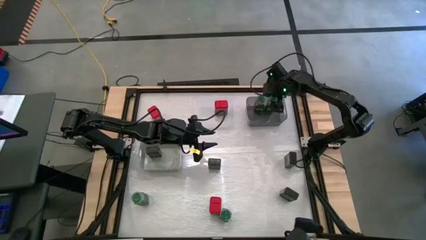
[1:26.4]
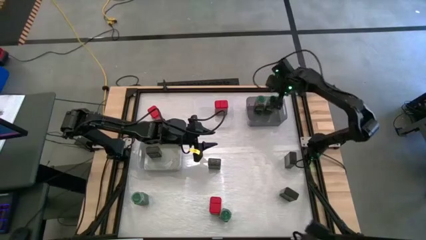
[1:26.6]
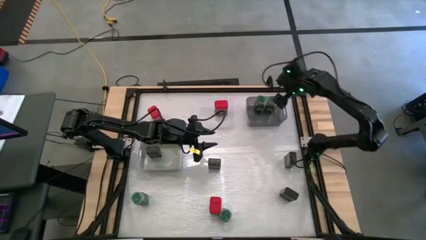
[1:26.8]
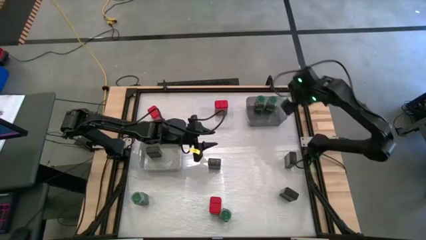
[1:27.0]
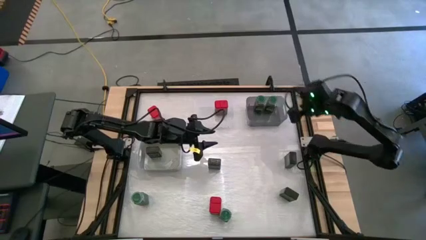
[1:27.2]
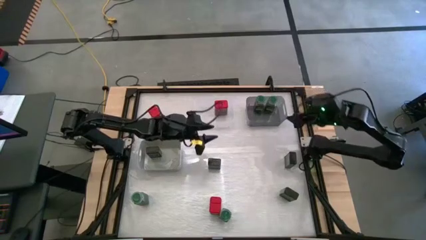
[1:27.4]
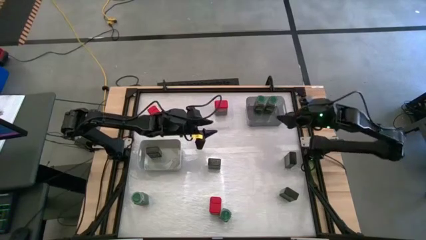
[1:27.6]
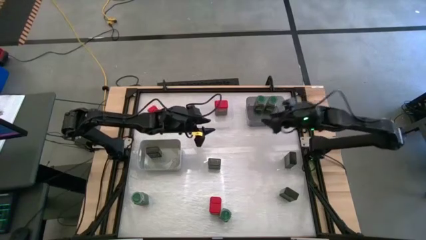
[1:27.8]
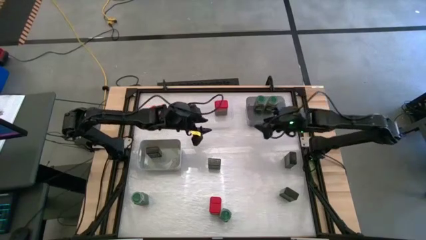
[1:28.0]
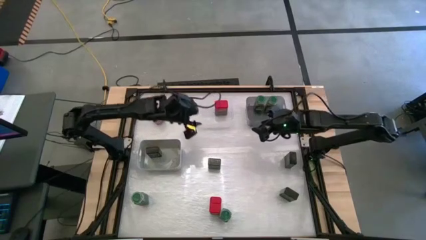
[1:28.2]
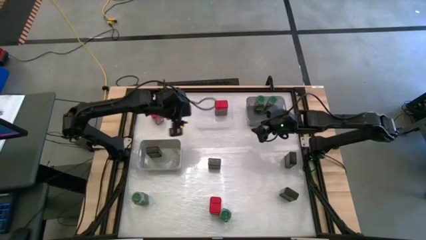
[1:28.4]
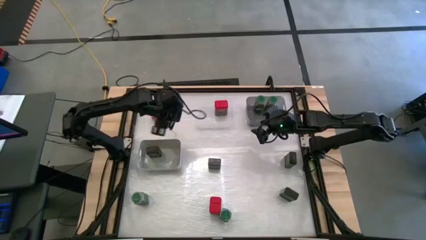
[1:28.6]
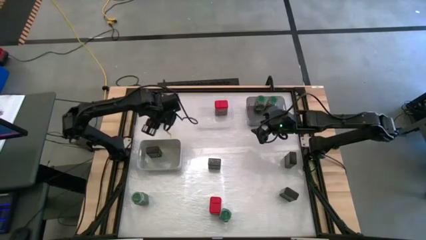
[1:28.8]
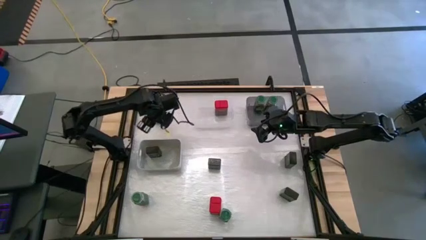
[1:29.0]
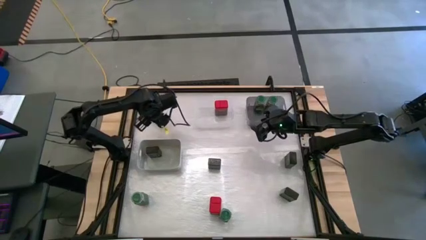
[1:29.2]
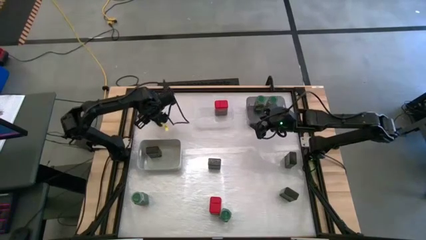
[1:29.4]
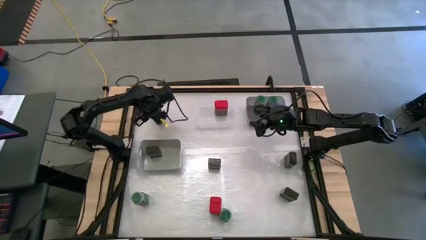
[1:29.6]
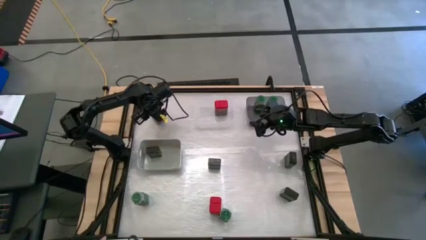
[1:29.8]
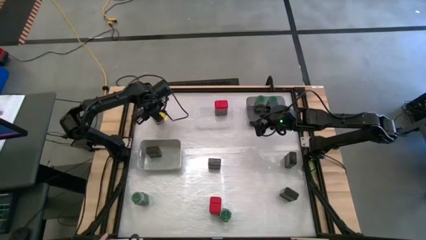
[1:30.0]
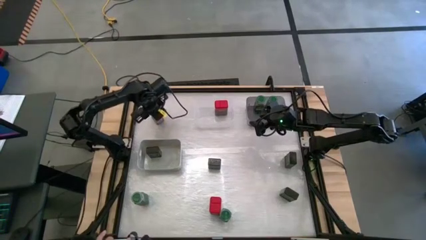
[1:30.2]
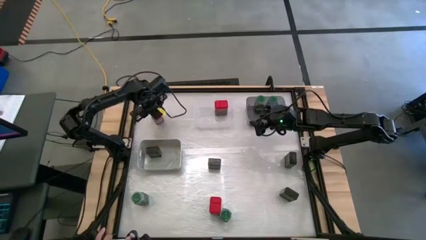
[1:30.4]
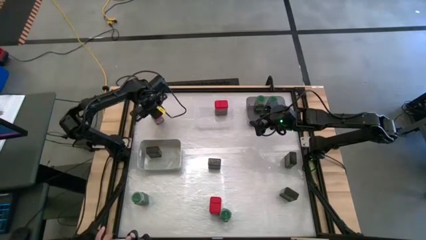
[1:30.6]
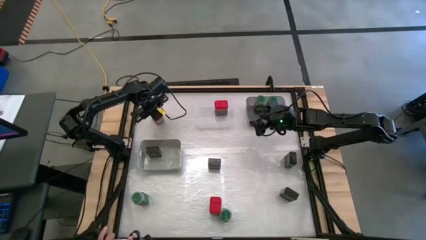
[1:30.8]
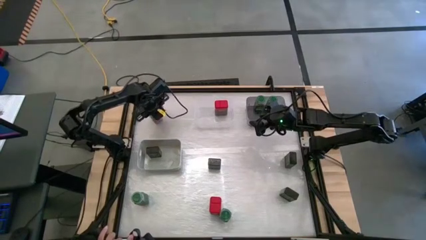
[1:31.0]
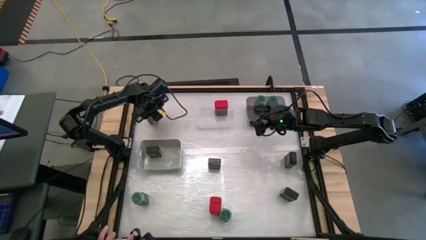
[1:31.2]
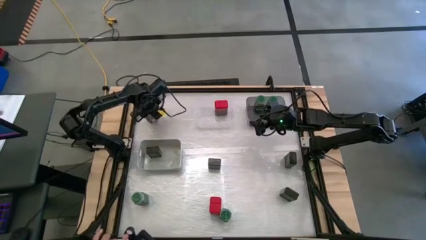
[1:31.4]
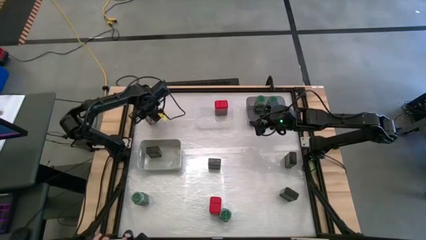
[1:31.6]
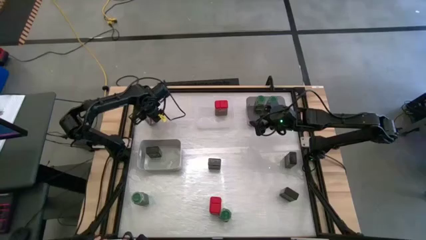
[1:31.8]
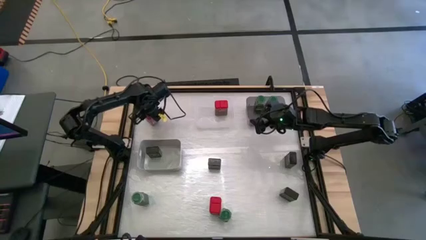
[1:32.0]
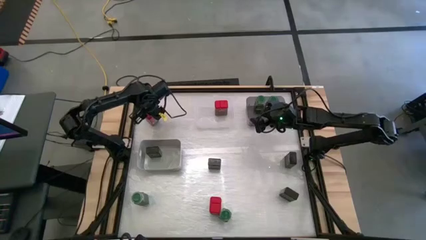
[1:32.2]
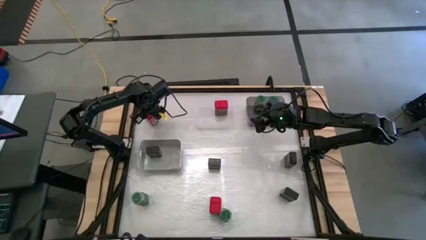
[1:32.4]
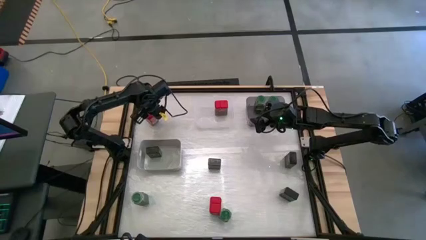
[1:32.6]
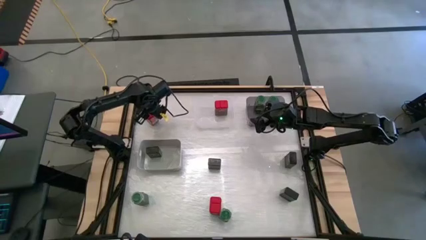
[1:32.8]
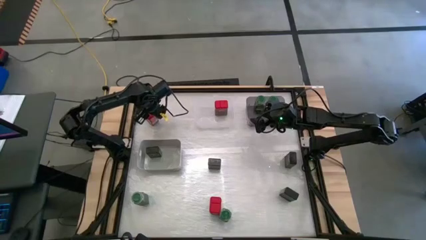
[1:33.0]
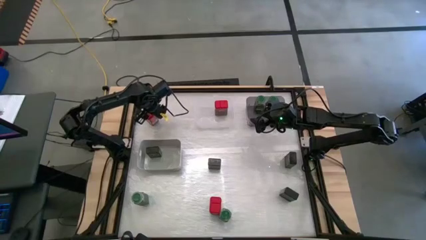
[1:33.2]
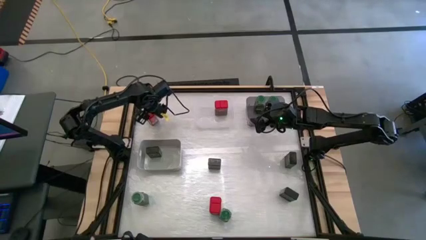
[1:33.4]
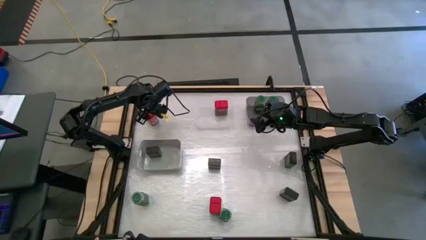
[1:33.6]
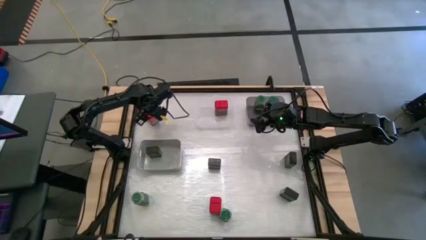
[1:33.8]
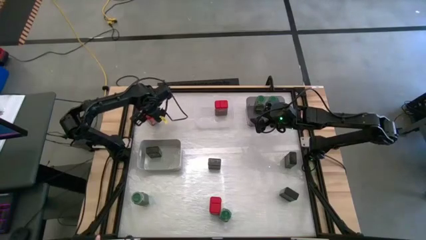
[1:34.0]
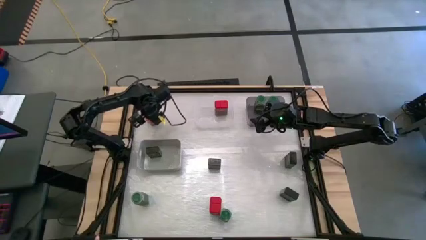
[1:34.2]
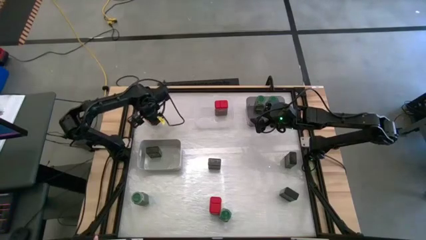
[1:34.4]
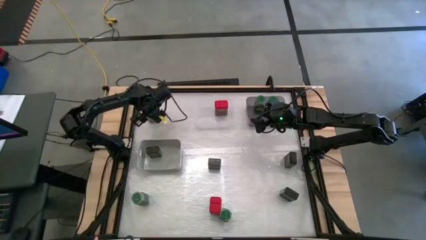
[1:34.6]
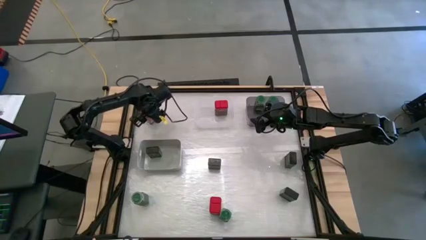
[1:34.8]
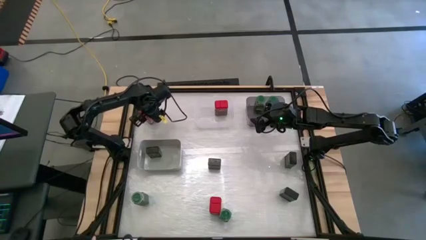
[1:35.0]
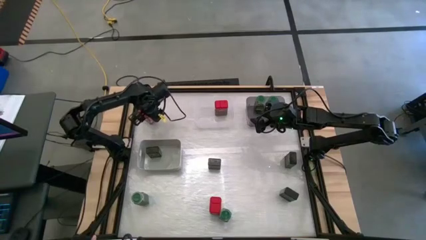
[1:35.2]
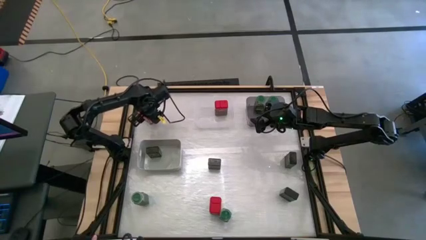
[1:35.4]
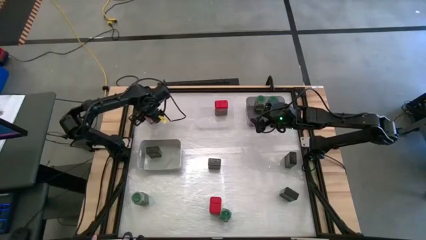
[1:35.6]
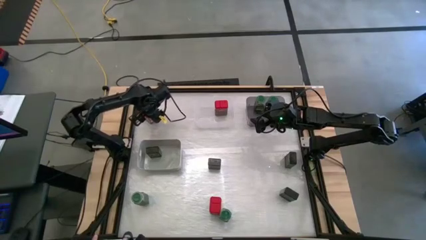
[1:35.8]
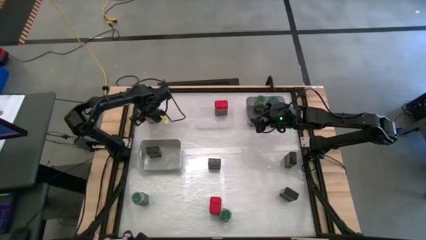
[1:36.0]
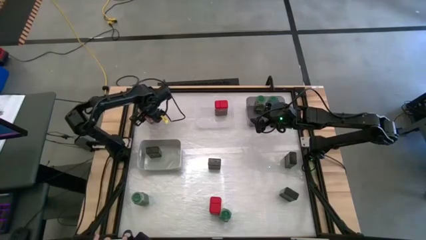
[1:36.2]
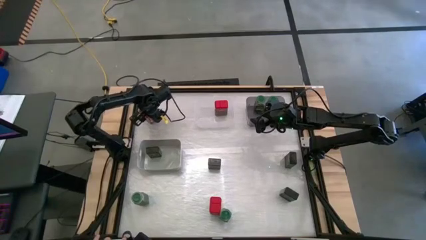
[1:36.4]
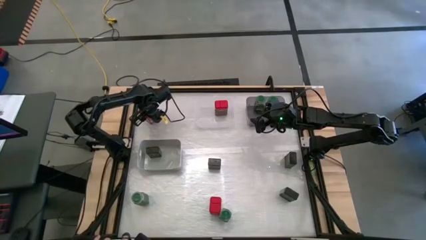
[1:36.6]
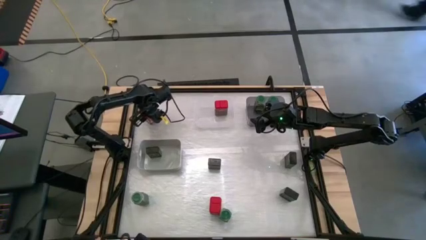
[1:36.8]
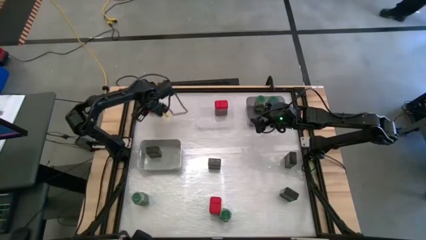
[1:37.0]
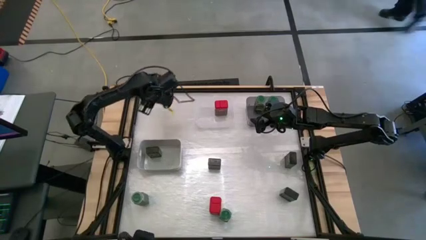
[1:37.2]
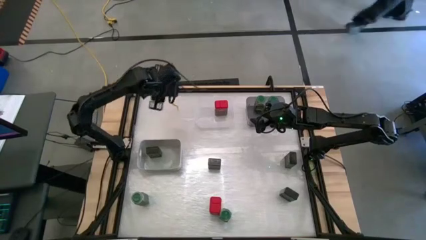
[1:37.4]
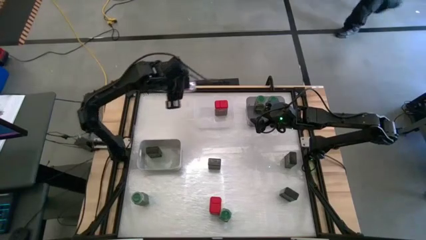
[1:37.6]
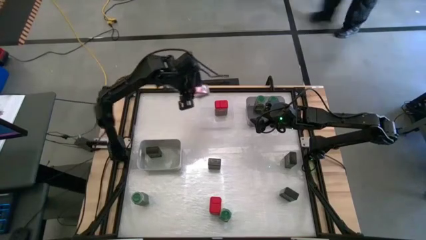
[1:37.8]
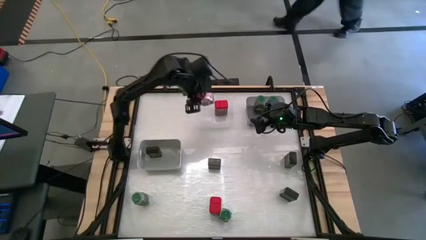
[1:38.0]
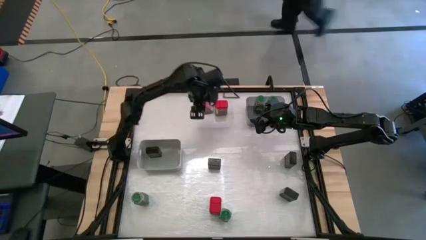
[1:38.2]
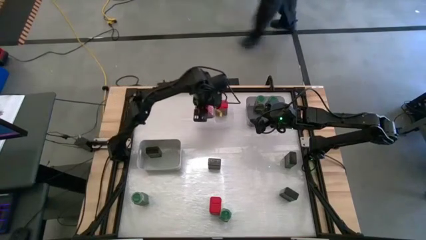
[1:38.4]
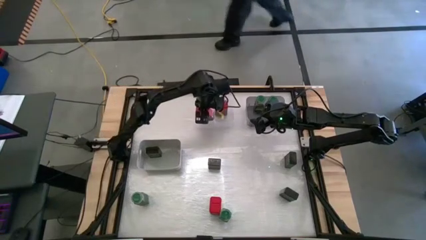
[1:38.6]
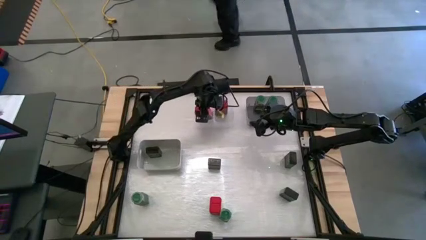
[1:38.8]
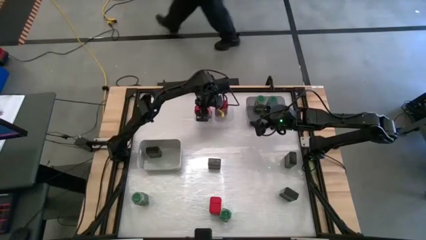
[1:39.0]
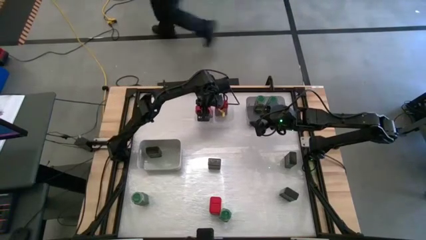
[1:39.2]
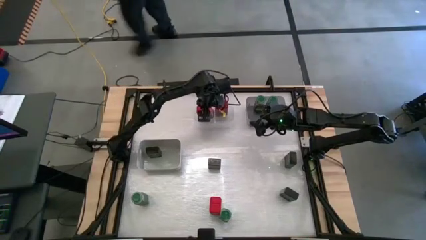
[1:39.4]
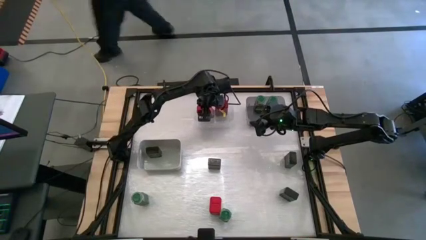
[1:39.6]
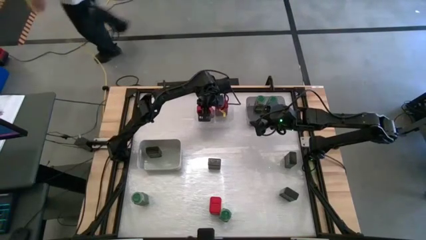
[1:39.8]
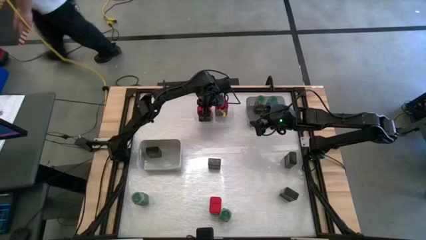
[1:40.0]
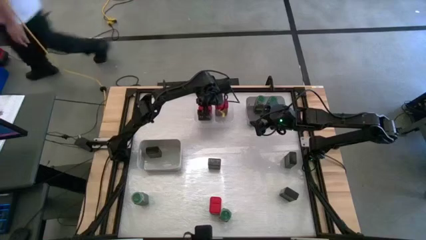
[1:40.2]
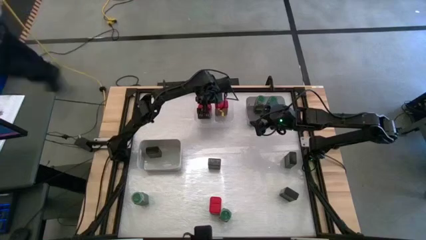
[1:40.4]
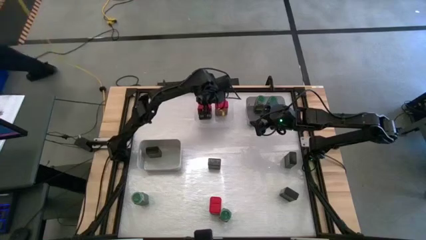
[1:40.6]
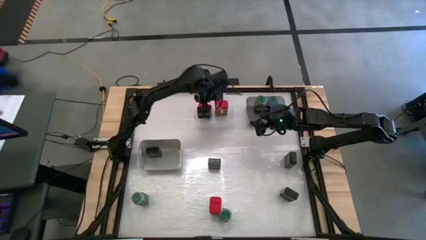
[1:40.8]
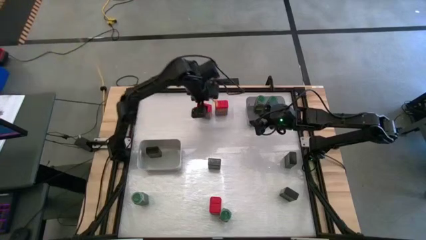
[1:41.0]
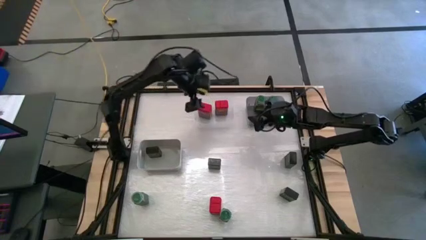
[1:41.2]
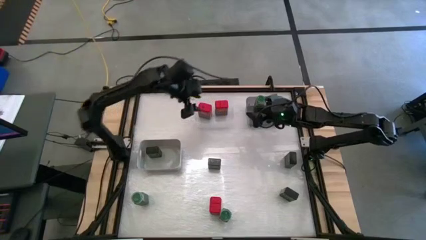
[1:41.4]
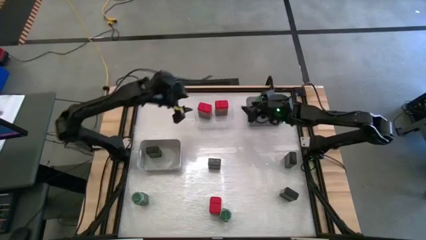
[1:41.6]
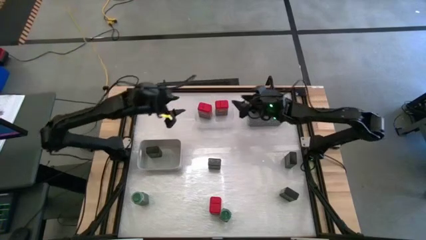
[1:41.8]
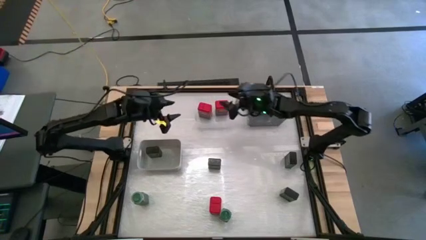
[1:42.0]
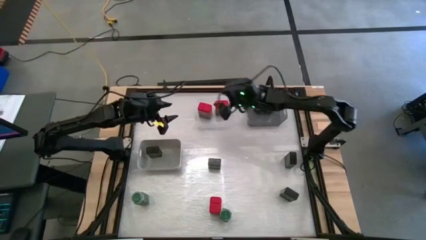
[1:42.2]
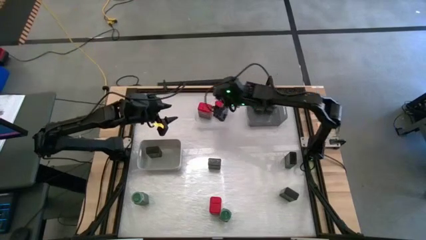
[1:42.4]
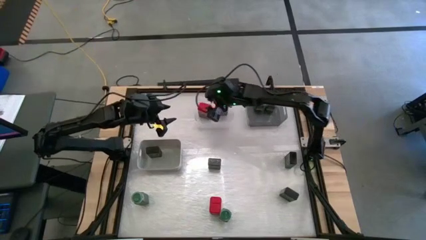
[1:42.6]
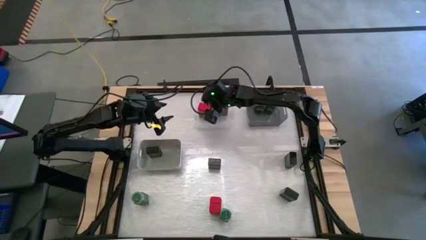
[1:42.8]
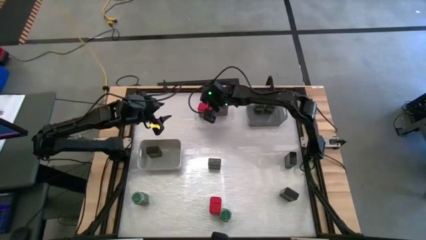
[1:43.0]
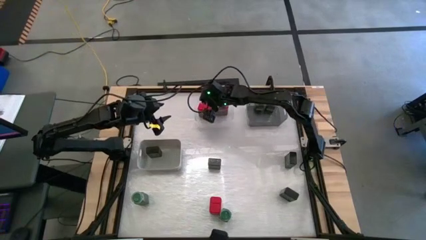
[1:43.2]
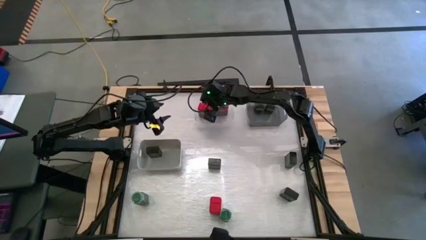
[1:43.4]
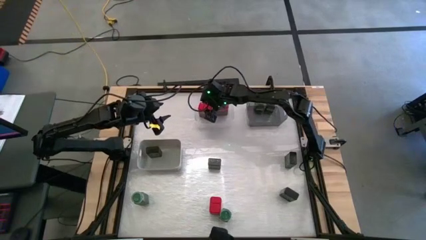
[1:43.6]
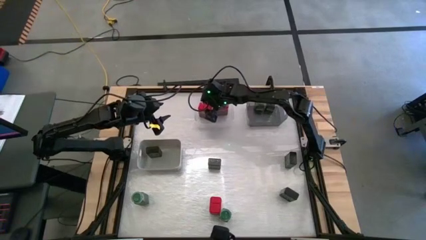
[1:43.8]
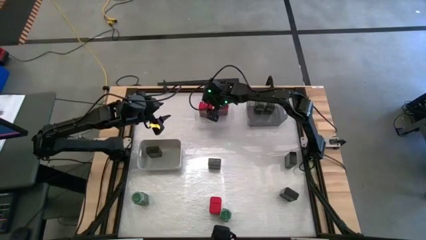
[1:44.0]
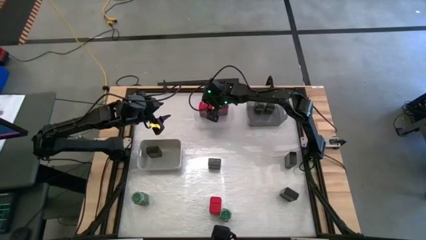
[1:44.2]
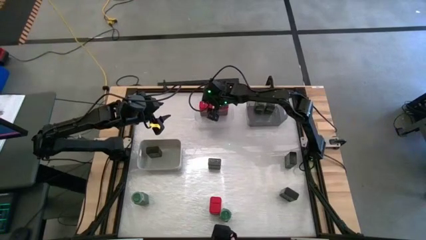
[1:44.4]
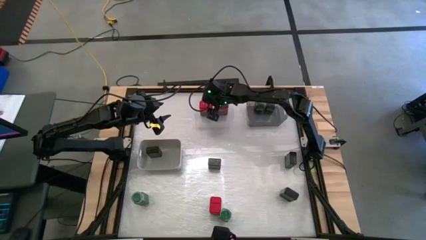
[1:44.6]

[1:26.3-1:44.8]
Task: Sort spices by type
Put the red seasoning can into the transparent bin
